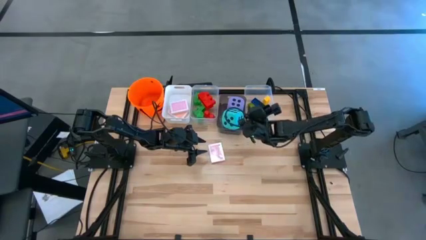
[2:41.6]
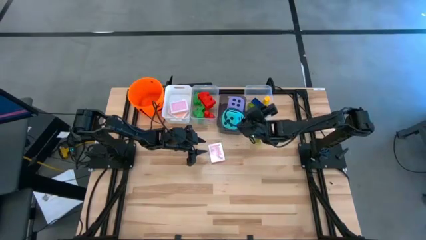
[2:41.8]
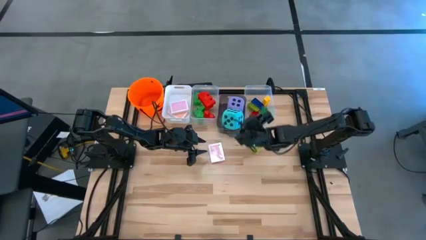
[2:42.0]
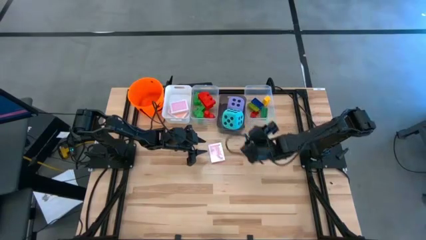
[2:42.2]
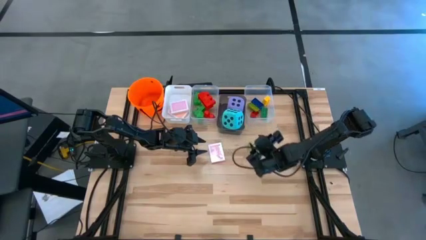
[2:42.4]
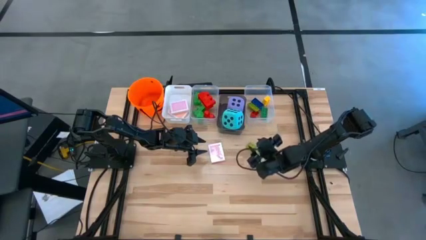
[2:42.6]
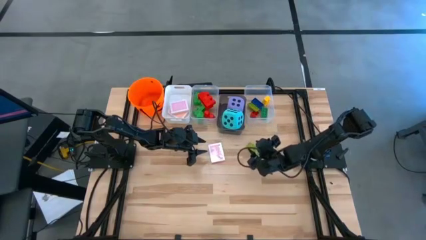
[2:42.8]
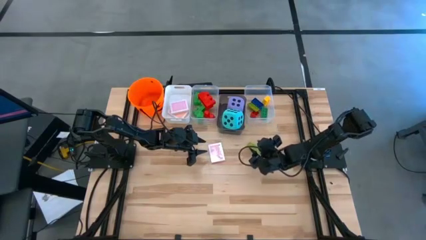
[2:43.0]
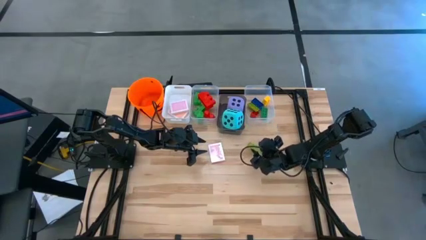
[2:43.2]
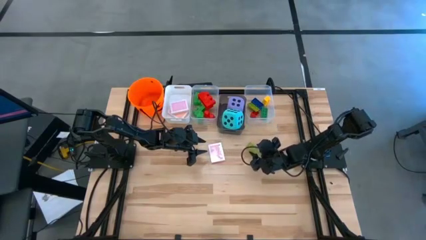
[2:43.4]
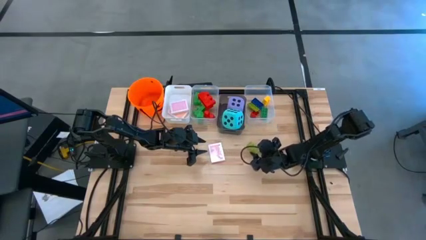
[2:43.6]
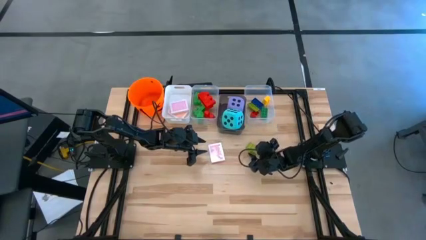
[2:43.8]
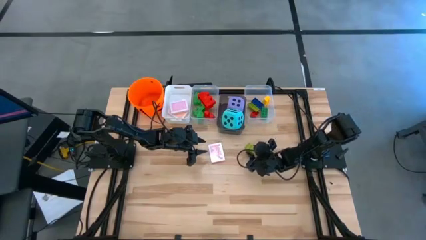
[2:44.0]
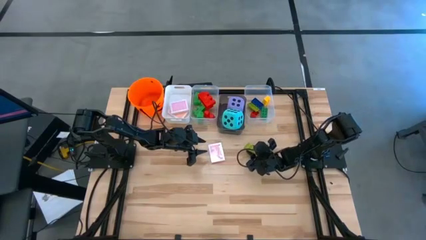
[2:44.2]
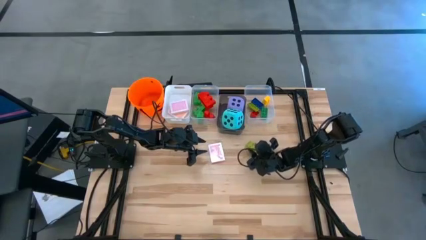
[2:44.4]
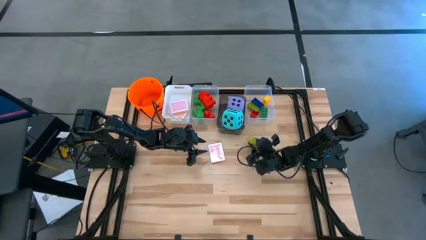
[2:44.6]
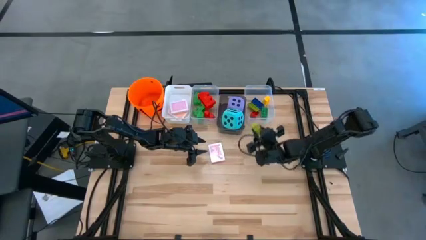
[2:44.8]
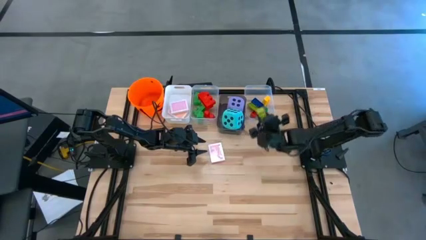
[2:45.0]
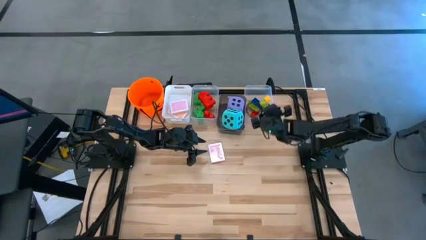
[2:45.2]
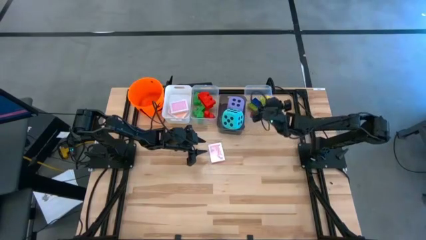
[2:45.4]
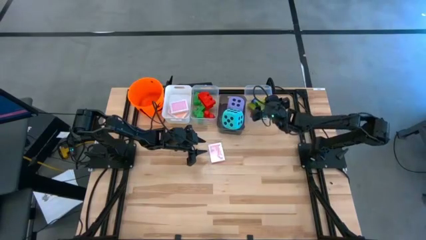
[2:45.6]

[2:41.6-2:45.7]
Task: Pick & Place Toys
Put the small light green game piece into the right transparent bin

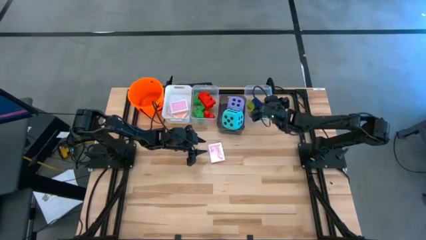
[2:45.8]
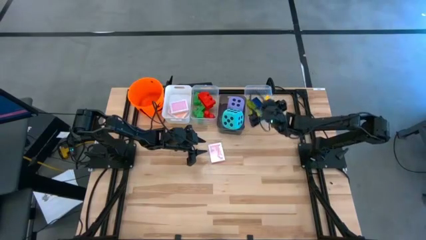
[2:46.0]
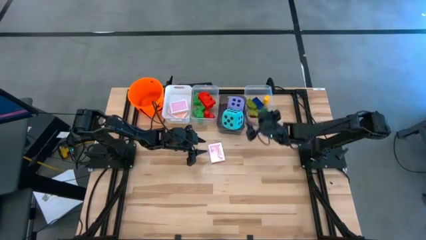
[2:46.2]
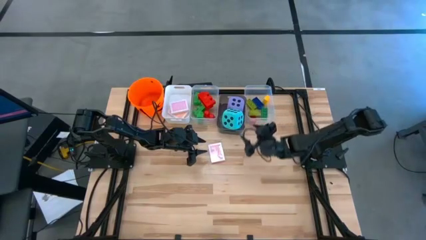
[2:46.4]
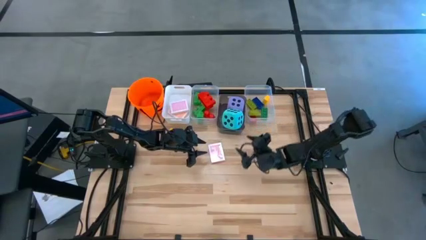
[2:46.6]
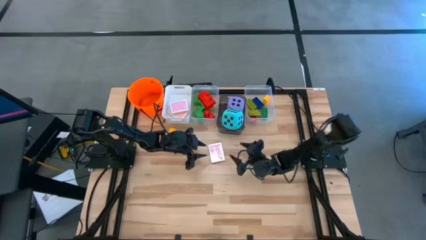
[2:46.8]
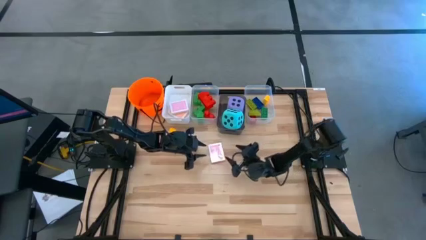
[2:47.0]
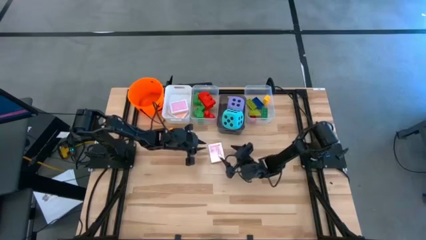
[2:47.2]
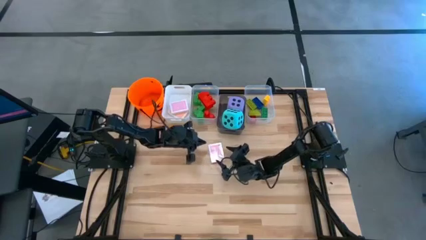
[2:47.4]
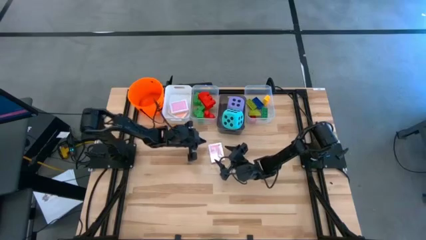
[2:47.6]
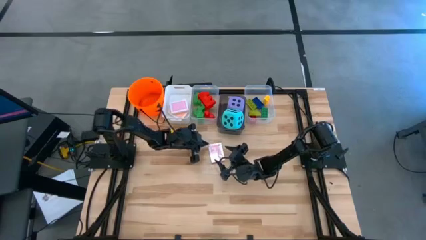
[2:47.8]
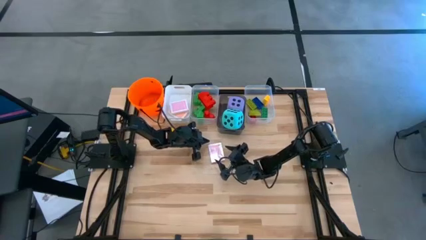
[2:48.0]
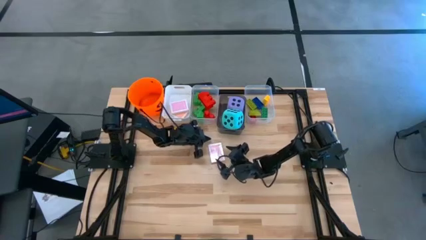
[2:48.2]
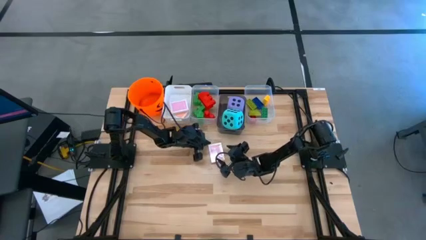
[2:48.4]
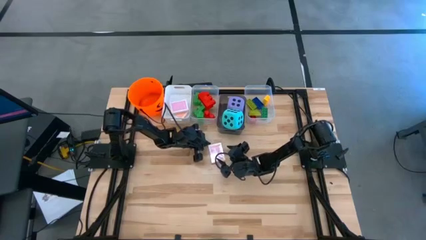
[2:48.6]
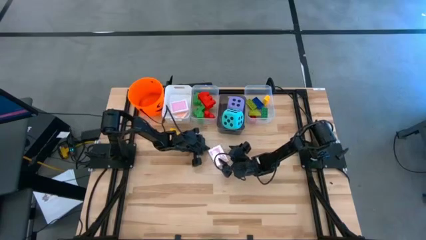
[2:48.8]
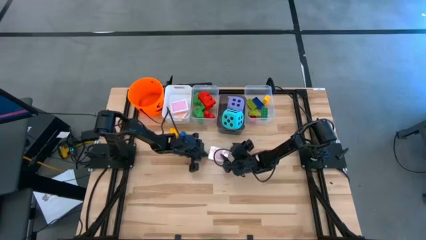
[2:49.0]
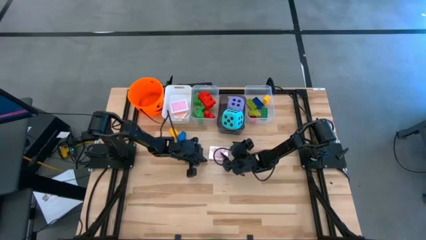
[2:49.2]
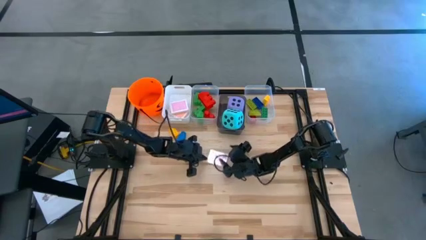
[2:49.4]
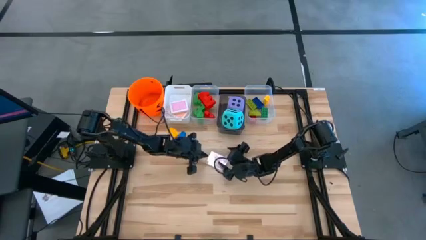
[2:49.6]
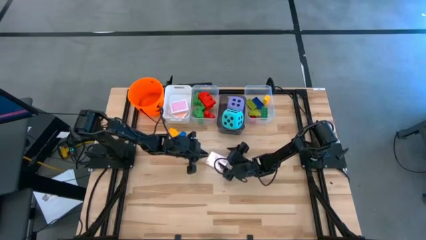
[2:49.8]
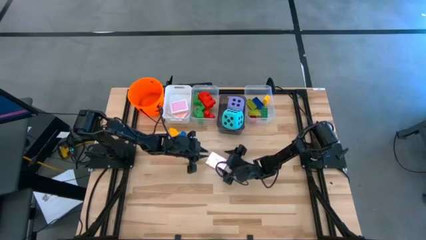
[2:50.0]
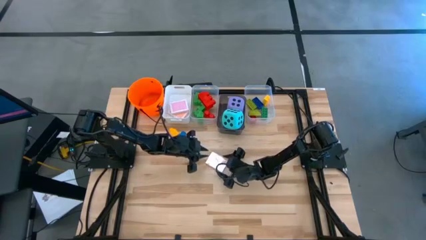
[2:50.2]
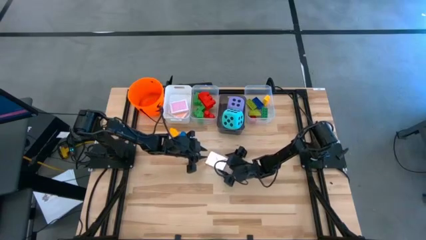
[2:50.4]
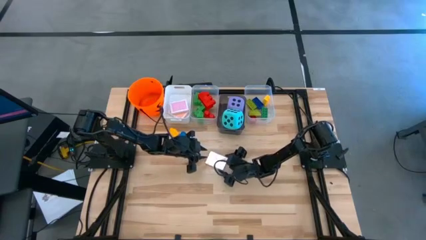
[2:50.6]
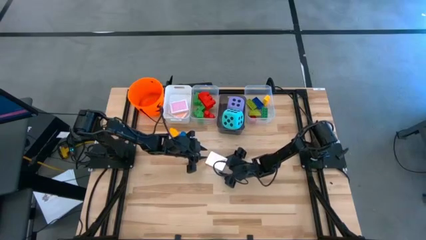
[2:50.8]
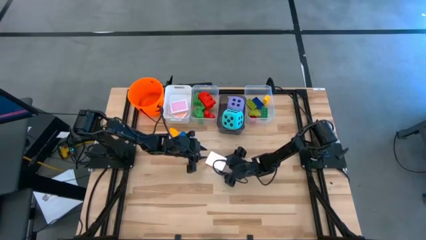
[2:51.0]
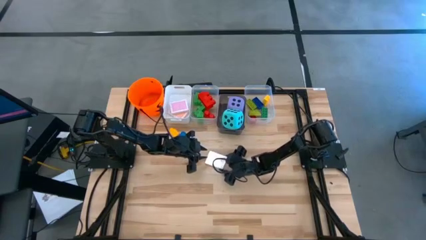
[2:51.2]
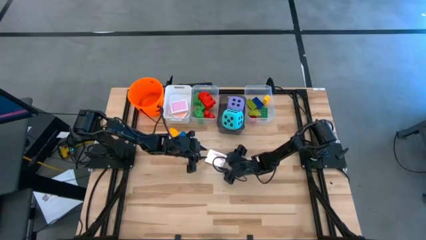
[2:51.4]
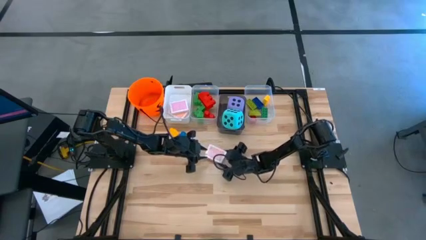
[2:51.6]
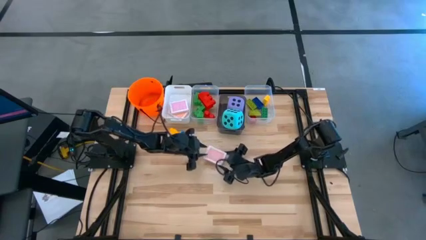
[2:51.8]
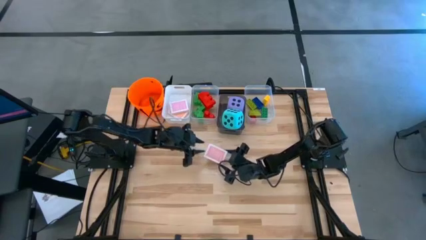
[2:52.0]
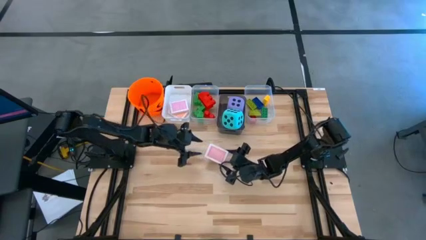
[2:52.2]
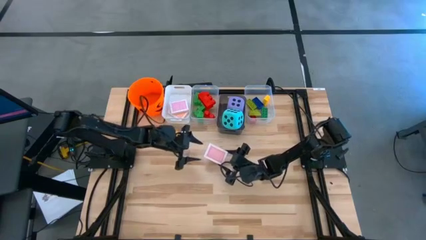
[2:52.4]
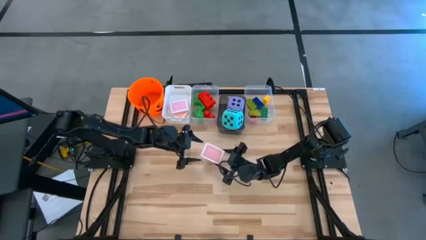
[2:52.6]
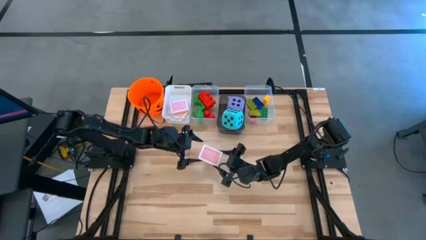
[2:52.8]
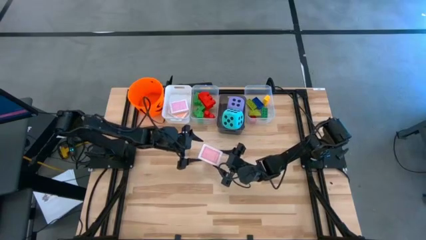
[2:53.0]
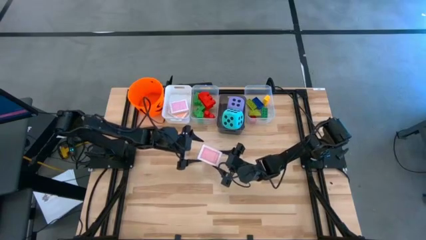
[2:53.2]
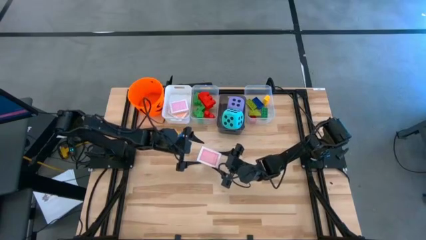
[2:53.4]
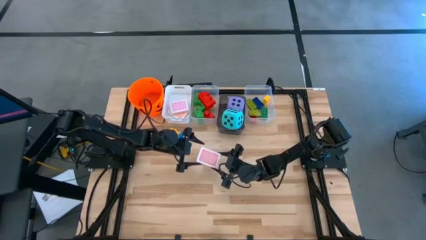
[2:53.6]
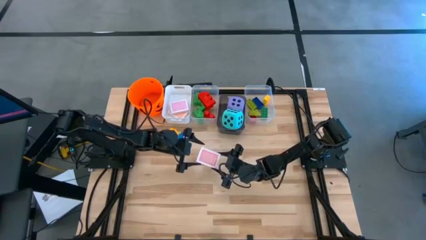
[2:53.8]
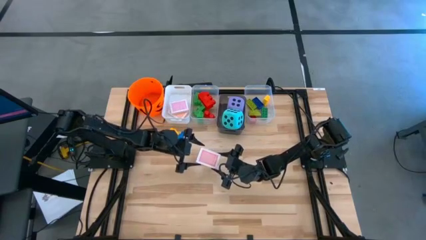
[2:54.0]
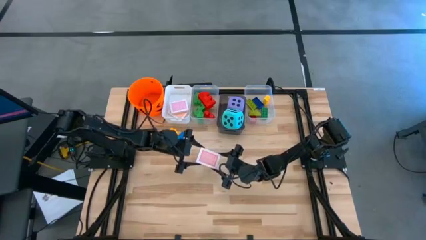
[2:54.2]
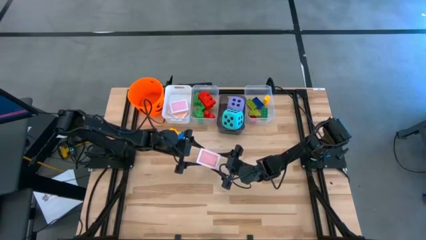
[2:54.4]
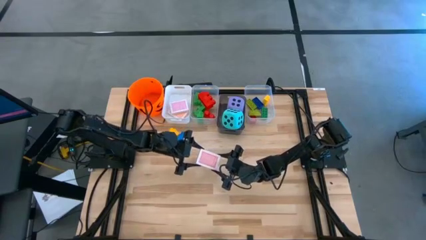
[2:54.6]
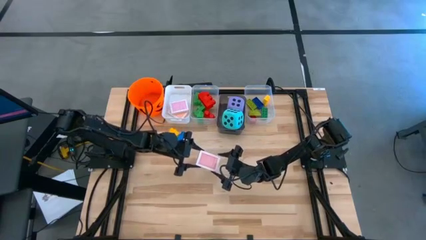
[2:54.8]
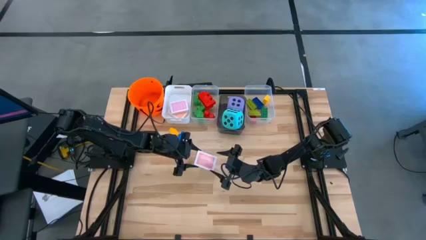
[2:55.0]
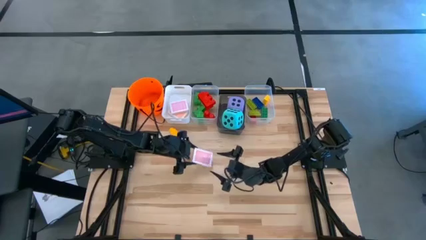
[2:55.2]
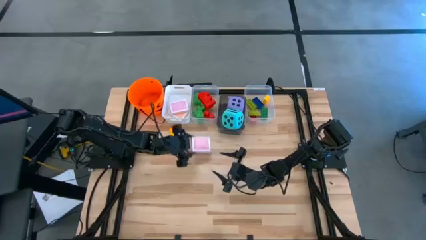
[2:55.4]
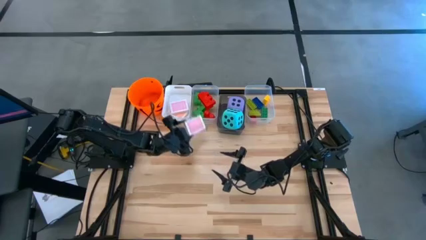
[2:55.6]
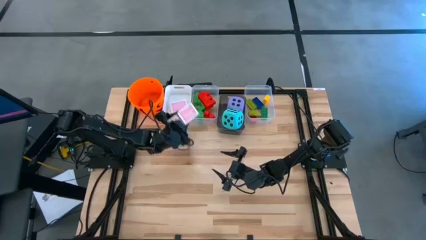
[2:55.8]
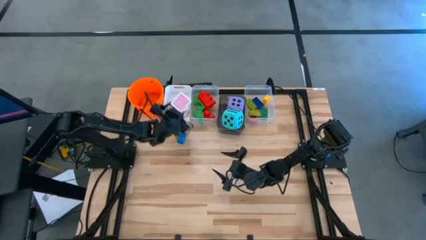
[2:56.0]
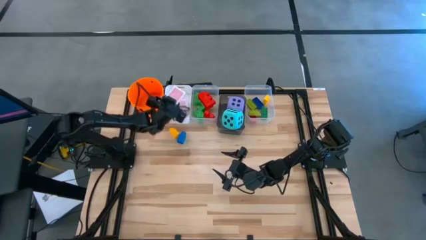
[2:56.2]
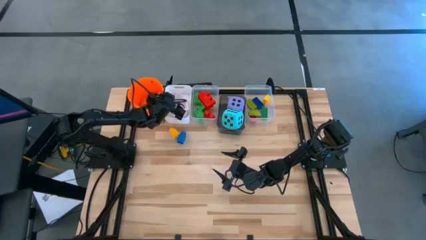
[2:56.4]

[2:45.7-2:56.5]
Put the red playing card box into the white bin

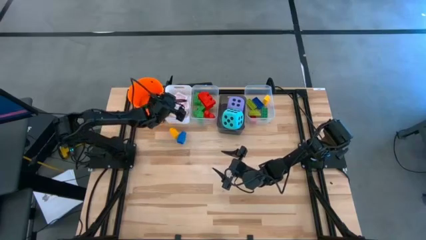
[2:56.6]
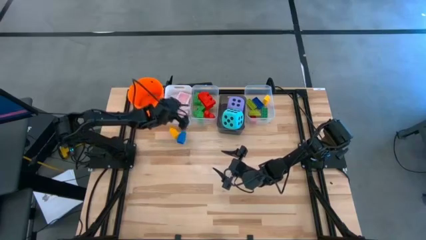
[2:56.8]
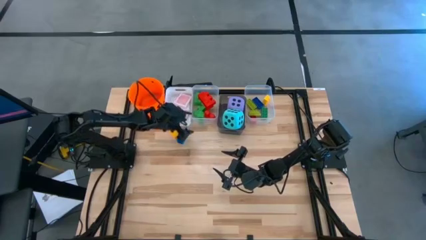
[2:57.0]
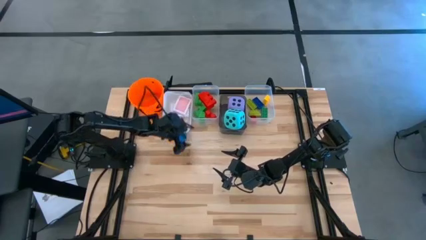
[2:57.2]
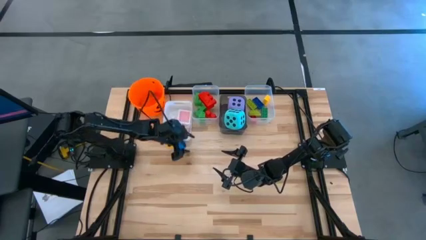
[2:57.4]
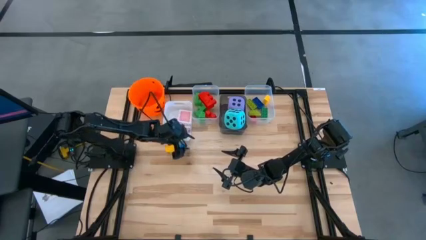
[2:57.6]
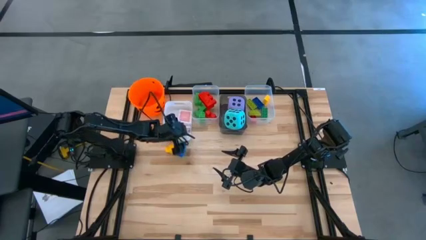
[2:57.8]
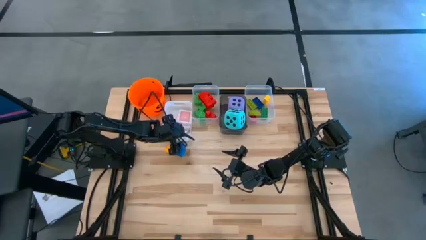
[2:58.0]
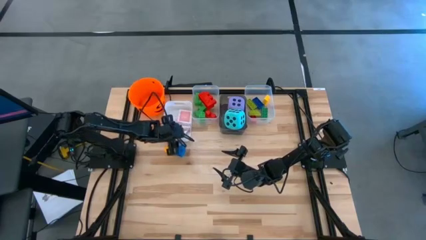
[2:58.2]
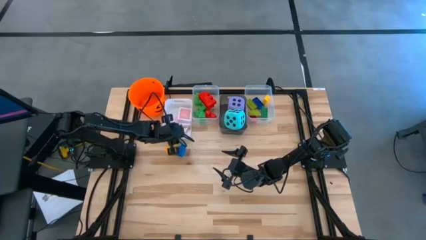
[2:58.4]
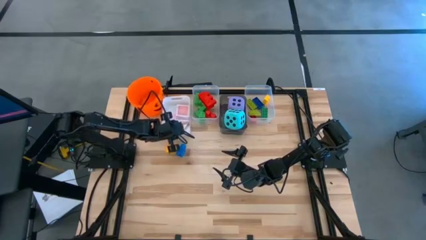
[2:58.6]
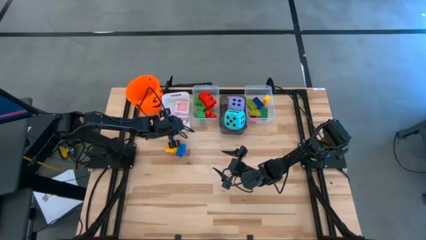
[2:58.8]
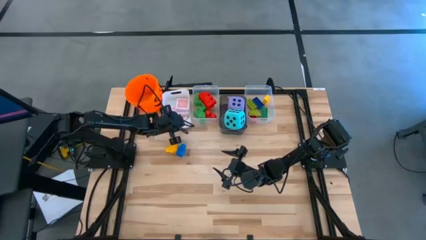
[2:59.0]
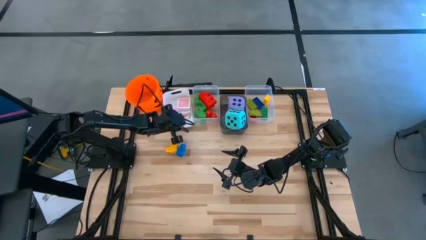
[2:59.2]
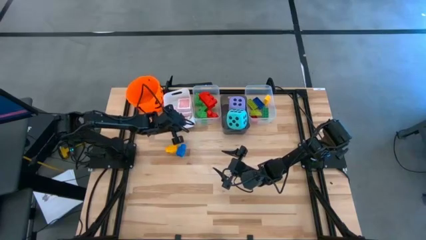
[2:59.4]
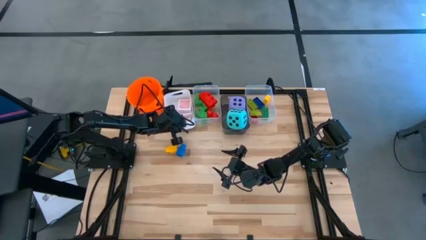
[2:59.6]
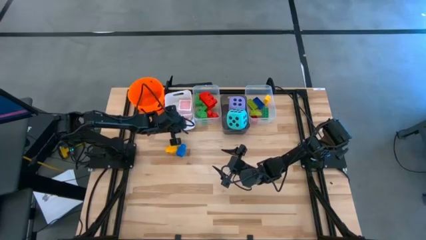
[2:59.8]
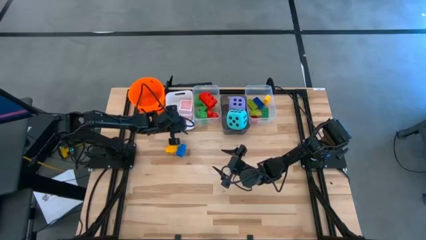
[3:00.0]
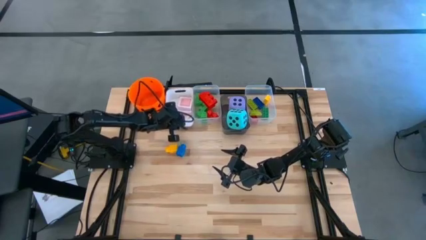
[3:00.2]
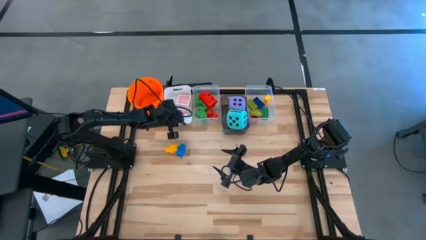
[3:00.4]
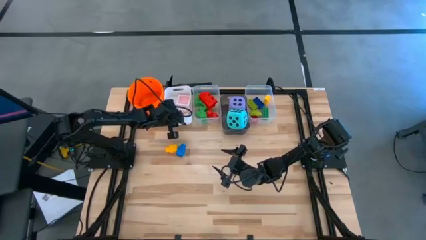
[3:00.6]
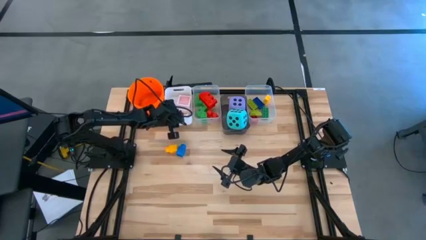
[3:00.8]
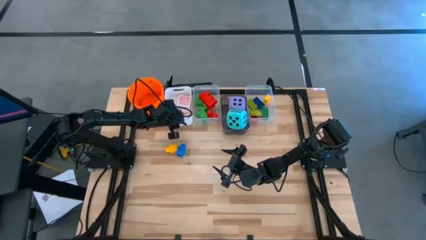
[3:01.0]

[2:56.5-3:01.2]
Adjust the white bin on the table
